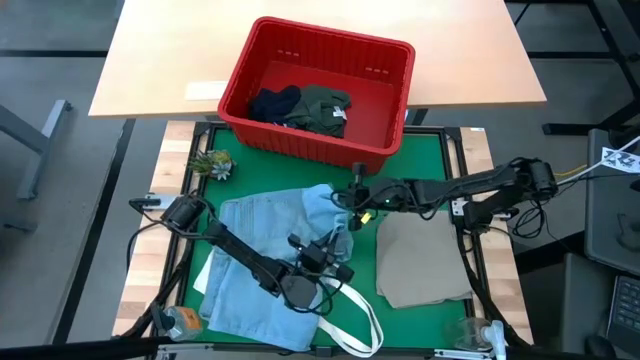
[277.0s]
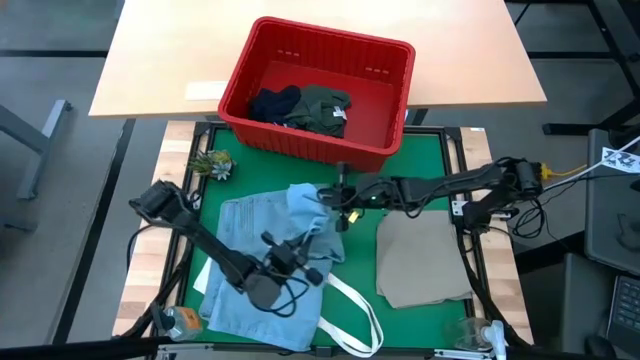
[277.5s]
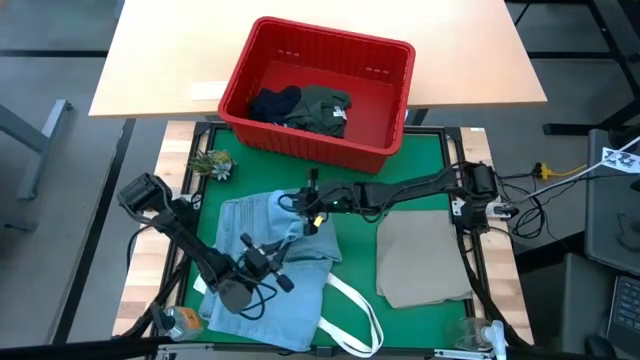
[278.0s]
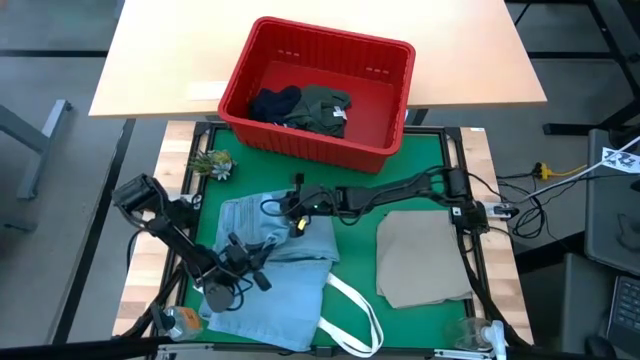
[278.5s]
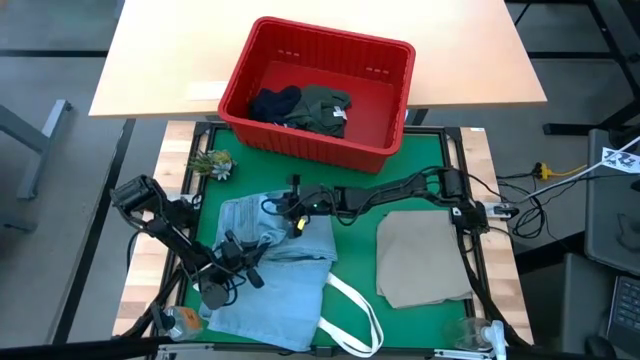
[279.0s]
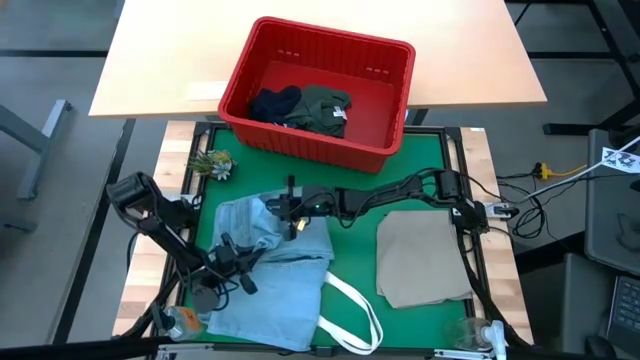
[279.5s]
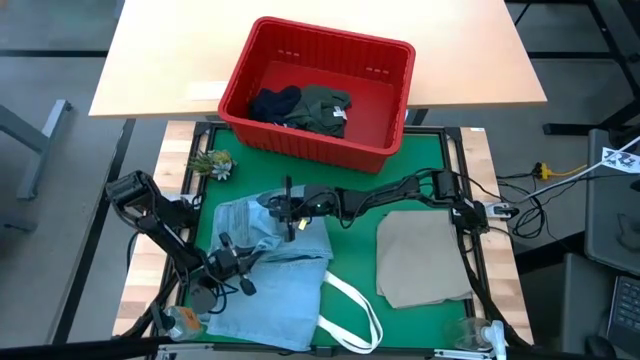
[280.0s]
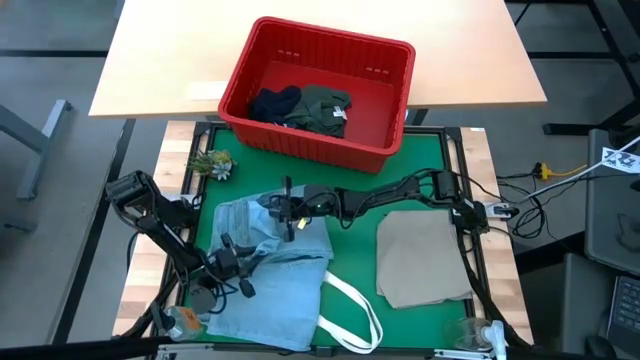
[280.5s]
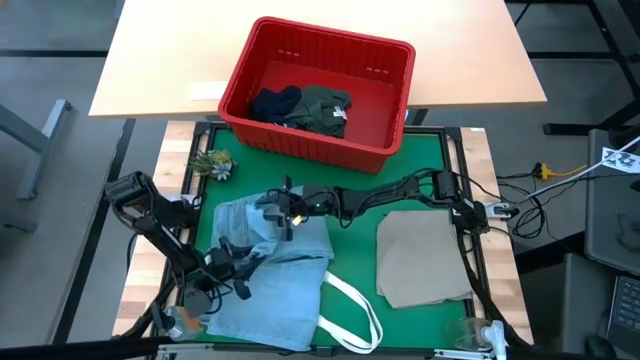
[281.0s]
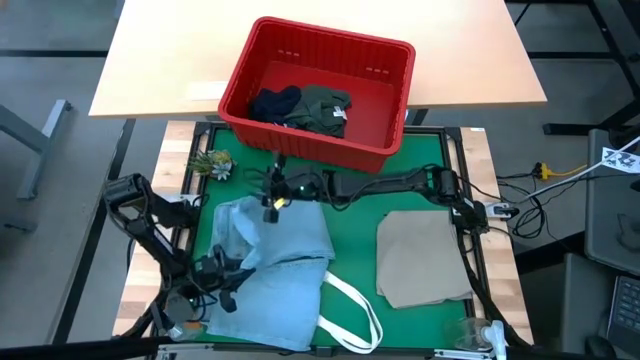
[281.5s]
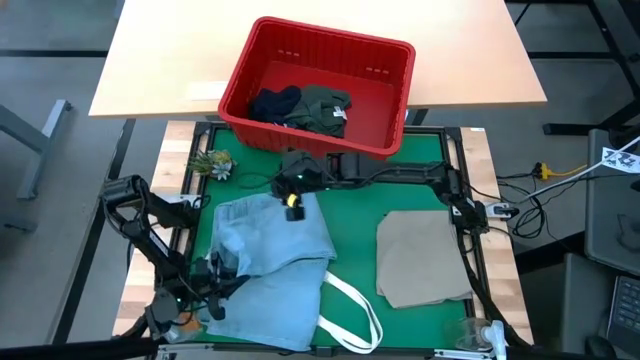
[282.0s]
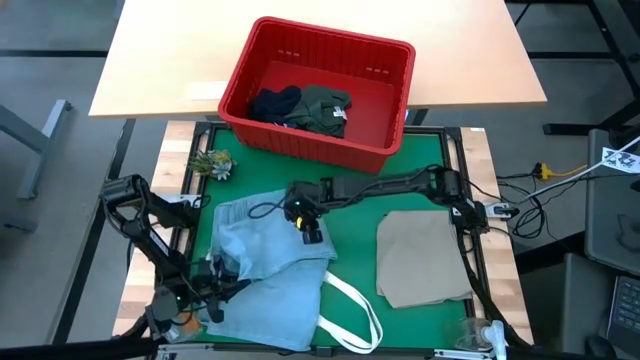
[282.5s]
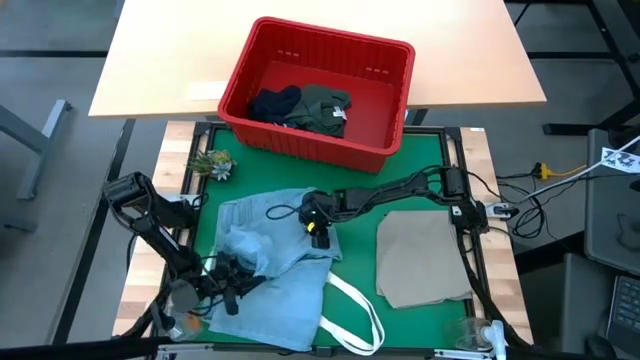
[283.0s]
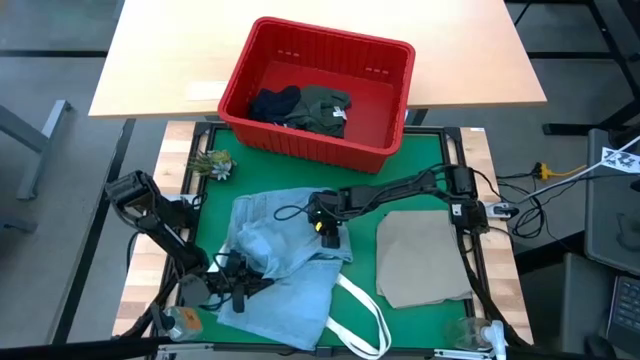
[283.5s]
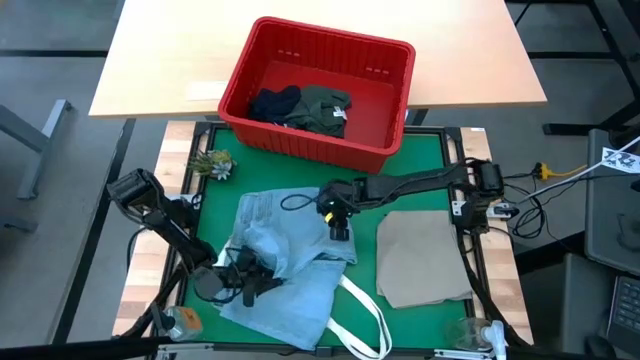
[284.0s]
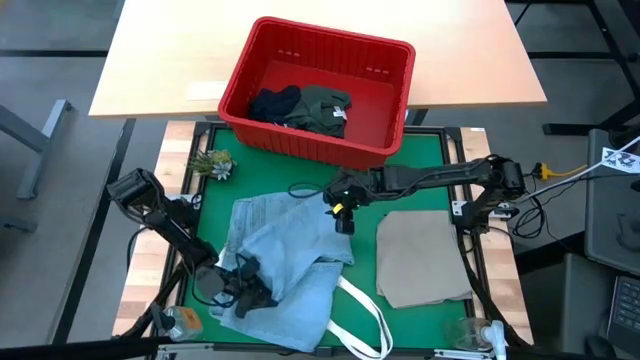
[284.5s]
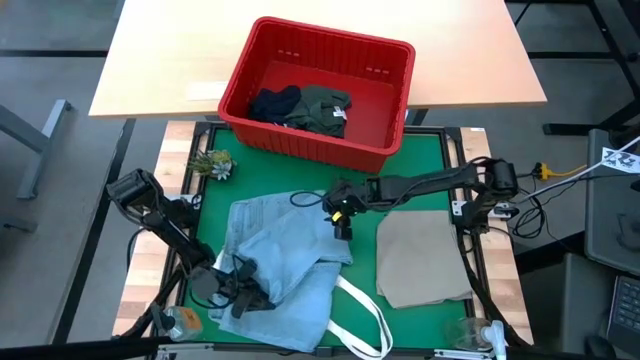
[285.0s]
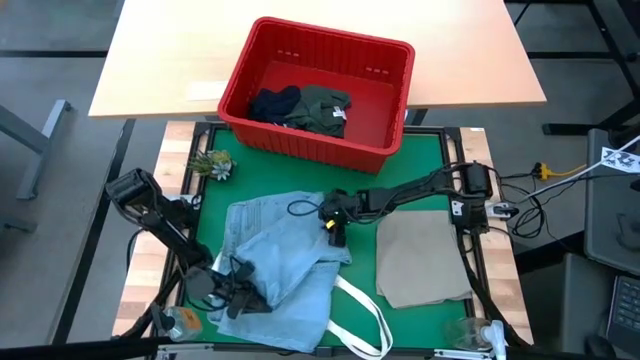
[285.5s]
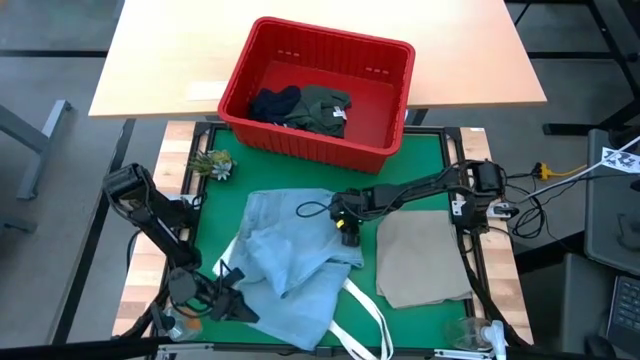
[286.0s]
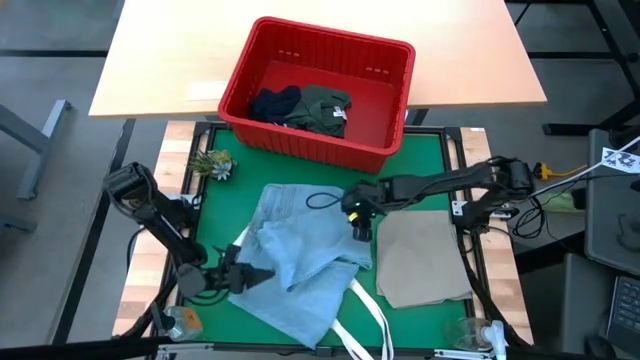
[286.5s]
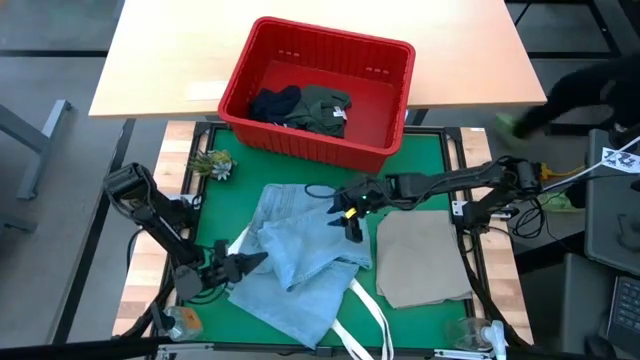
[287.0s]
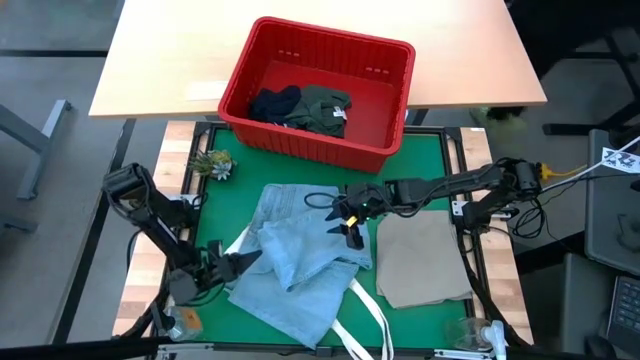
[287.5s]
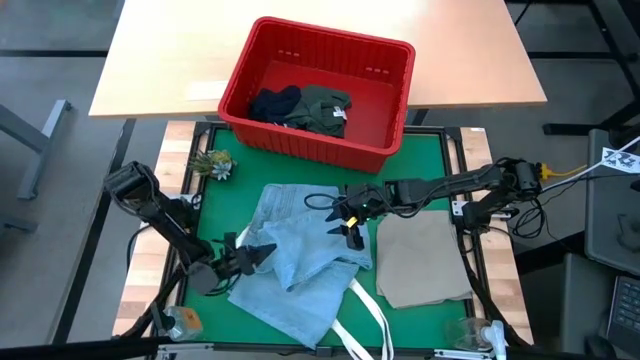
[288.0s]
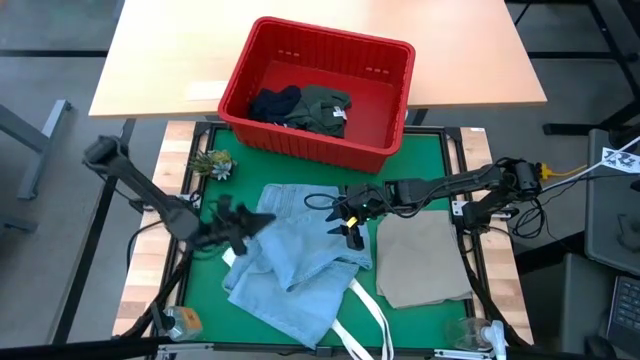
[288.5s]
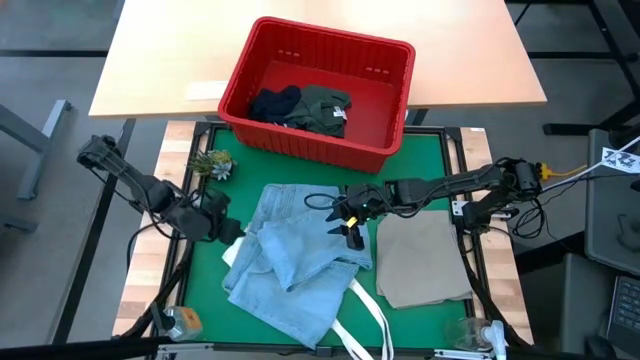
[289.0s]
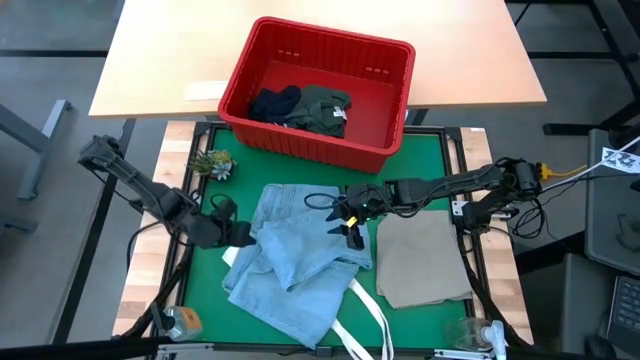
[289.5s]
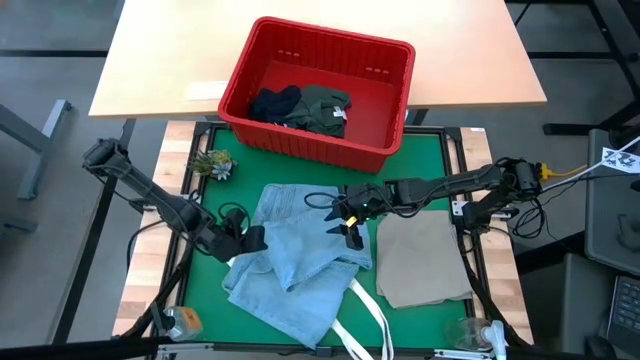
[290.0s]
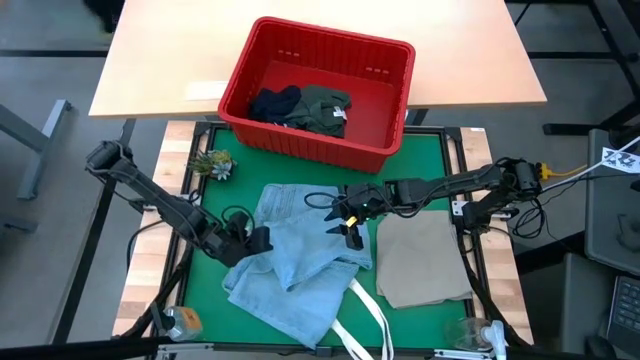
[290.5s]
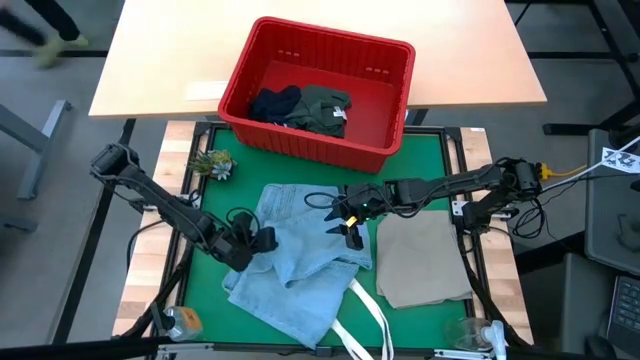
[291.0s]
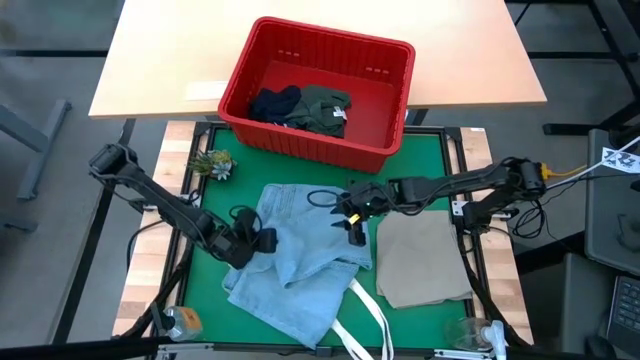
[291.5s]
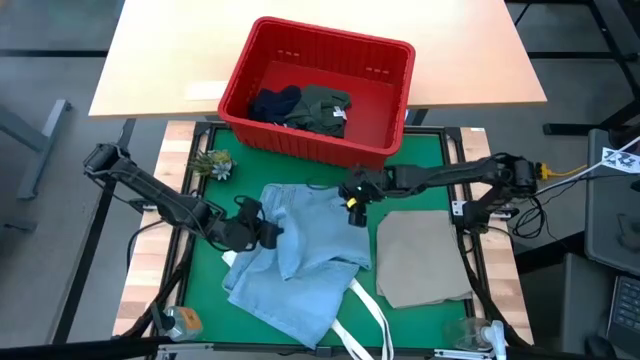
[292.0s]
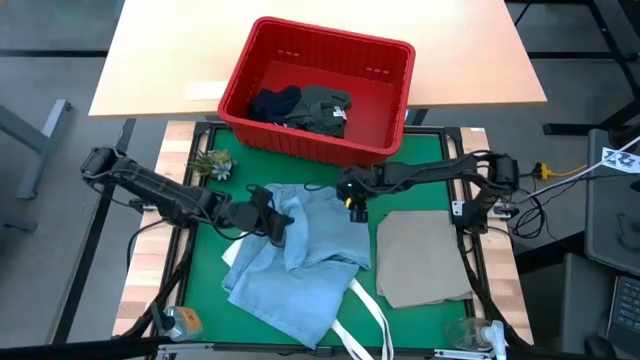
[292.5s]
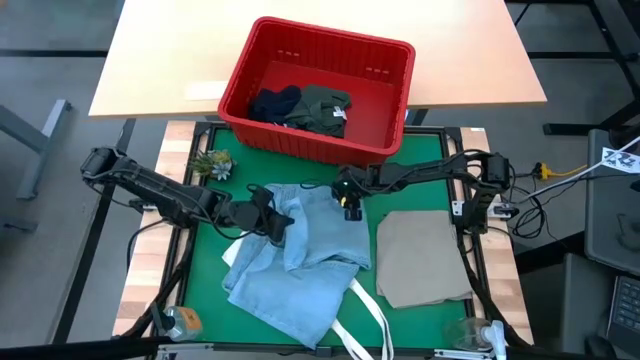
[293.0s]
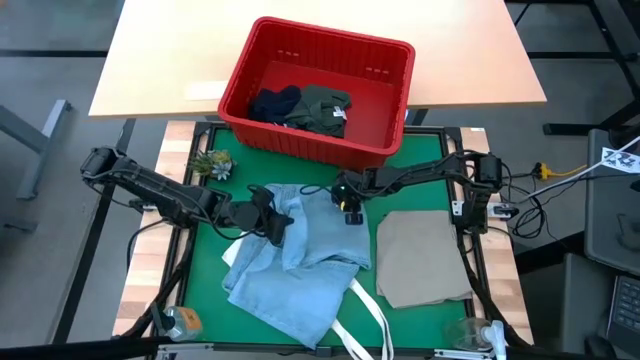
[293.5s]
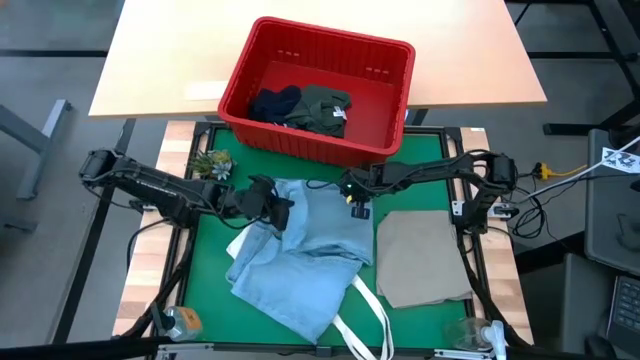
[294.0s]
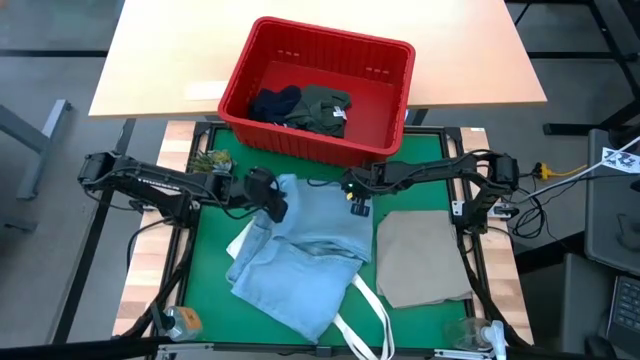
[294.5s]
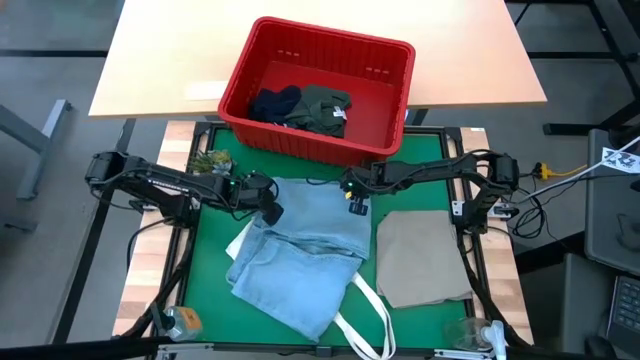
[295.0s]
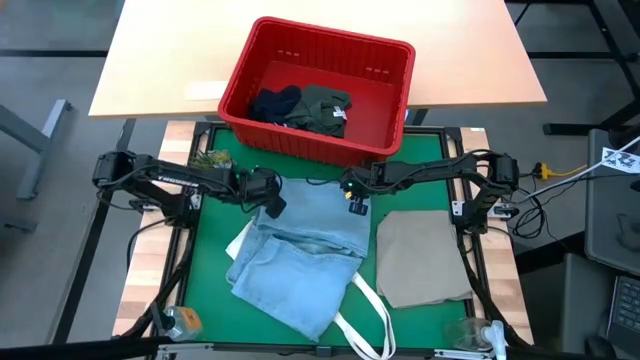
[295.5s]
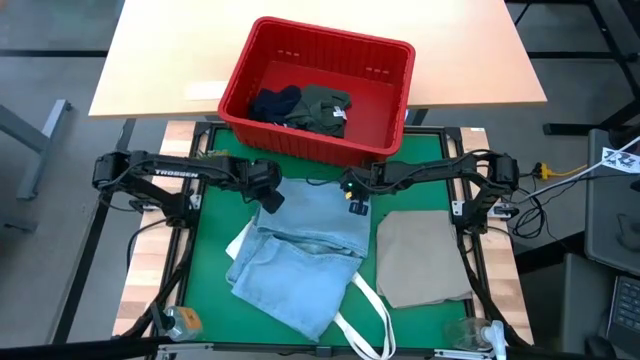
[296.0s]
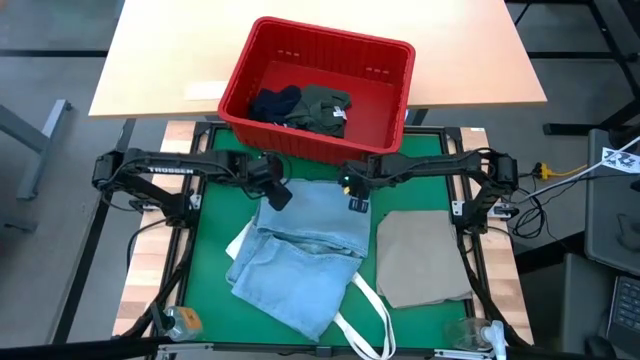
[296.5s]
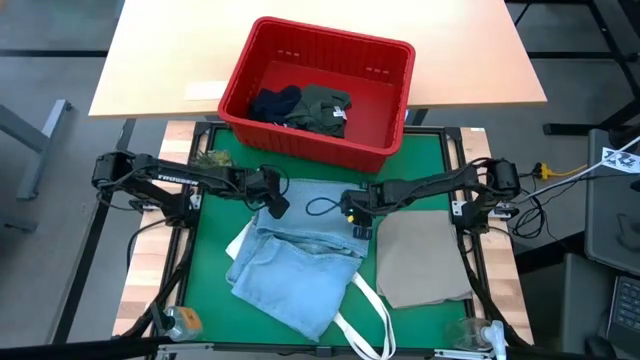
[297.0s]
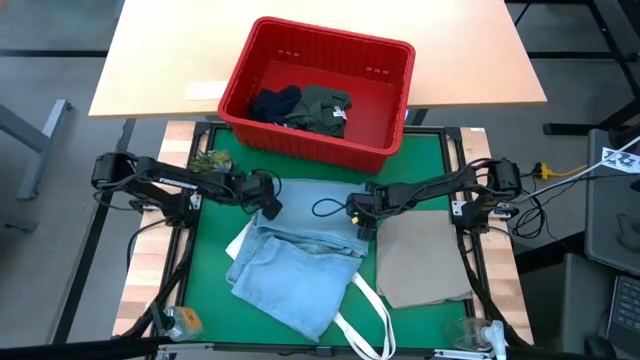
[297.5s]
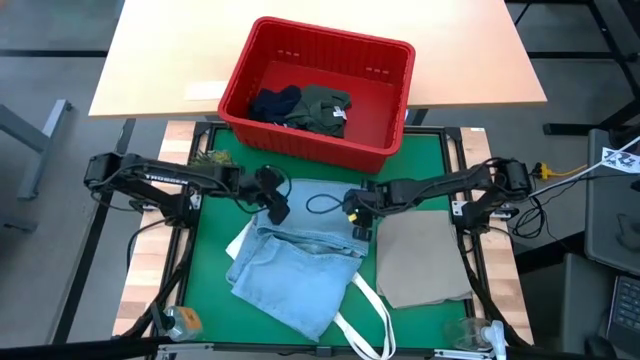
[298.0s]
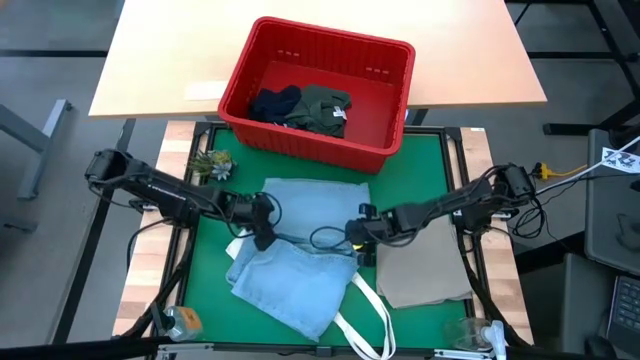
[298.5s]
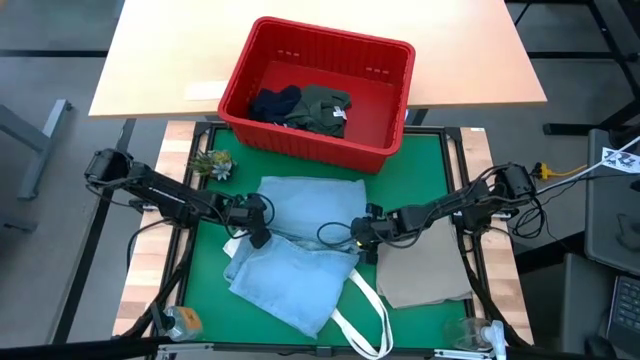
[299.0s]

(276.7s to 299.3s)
Task: Fold Laundry from Bin
Fold the light blue pants
